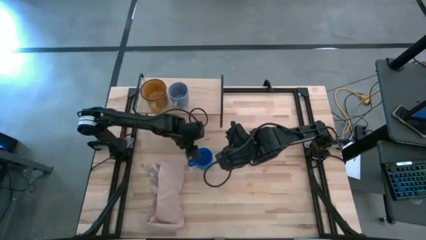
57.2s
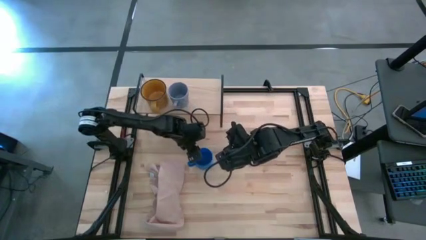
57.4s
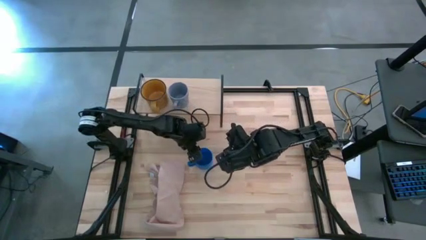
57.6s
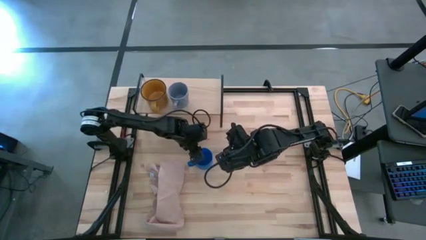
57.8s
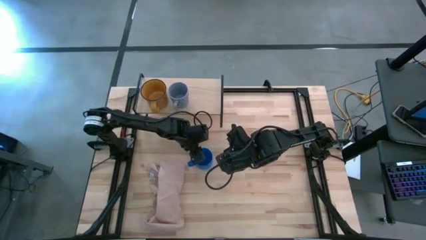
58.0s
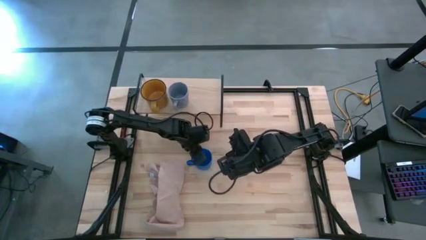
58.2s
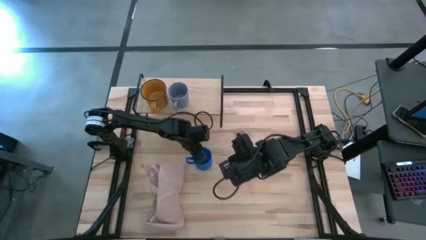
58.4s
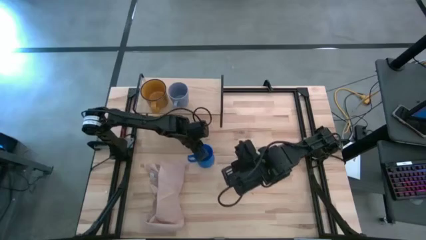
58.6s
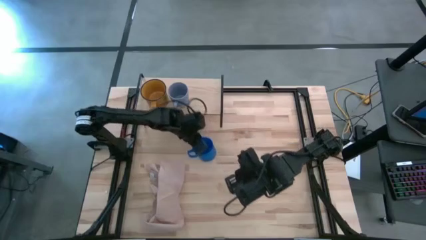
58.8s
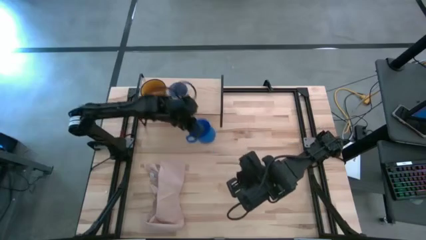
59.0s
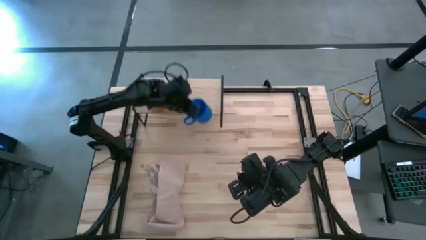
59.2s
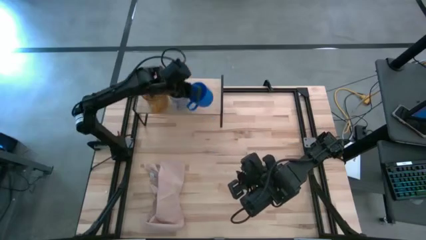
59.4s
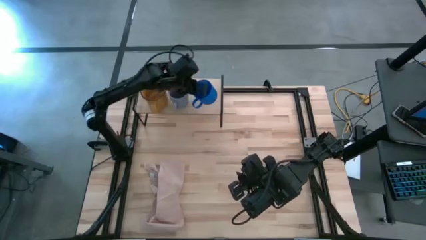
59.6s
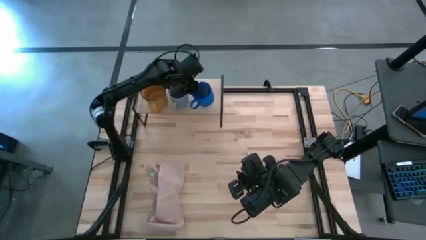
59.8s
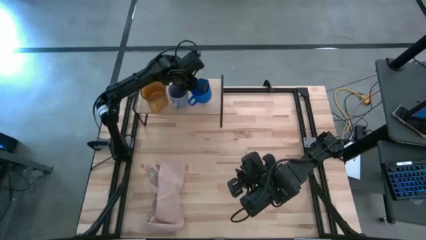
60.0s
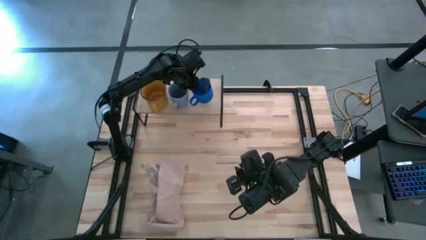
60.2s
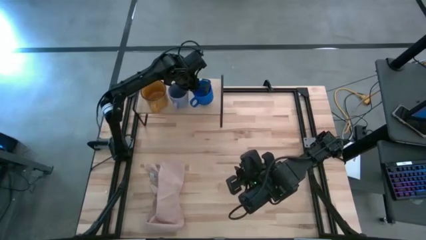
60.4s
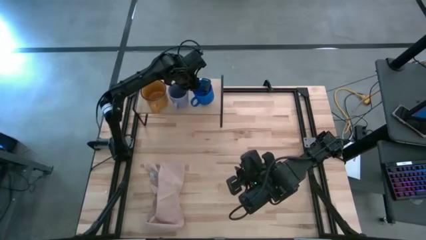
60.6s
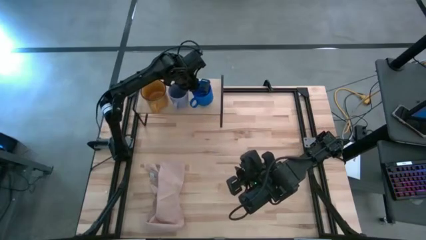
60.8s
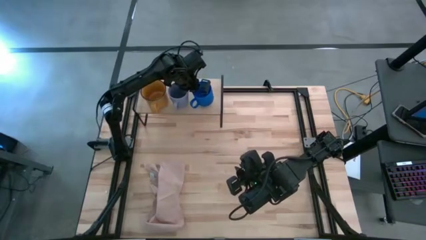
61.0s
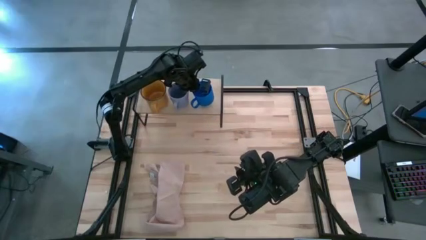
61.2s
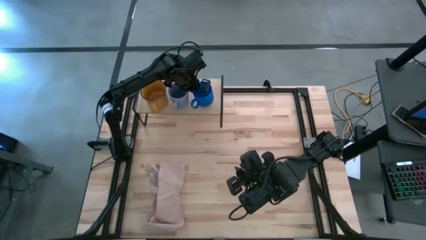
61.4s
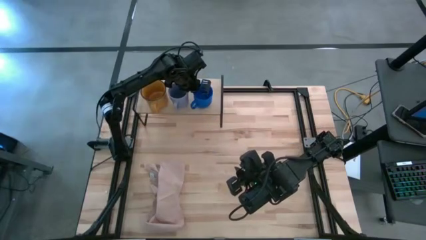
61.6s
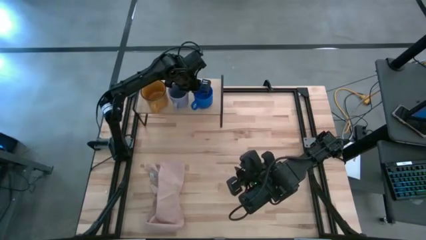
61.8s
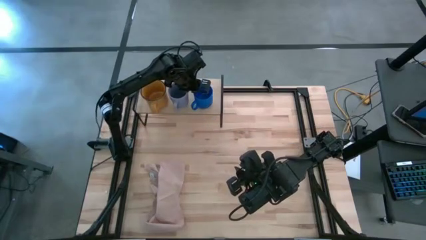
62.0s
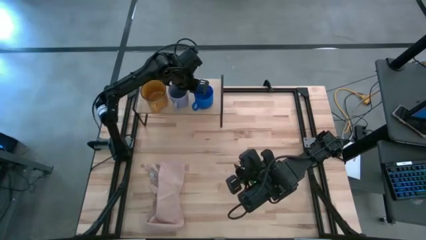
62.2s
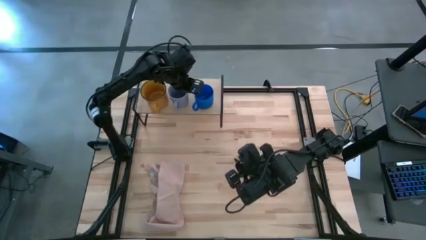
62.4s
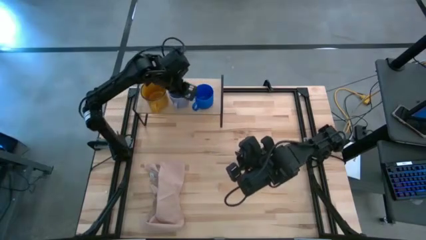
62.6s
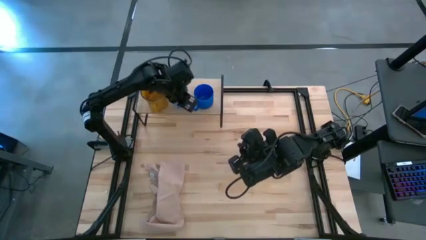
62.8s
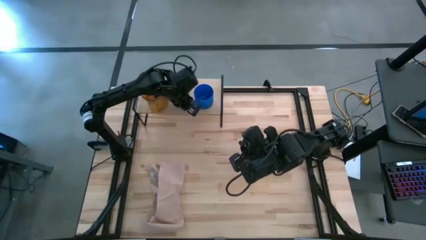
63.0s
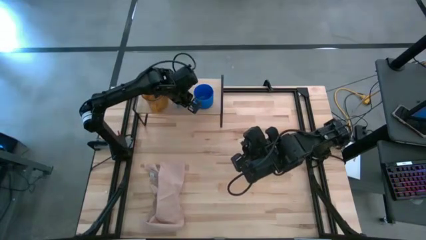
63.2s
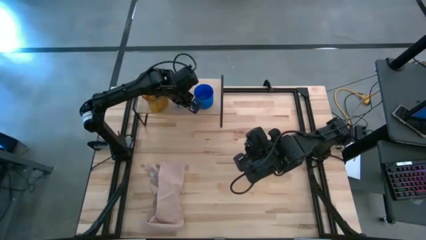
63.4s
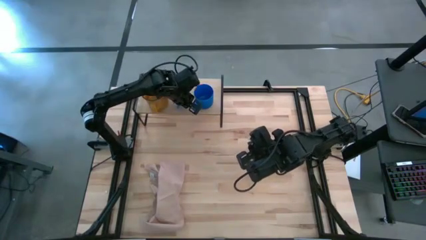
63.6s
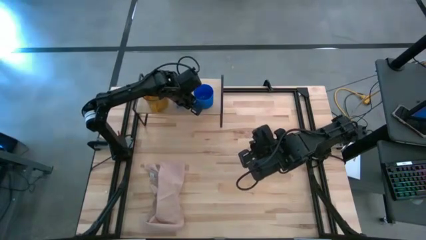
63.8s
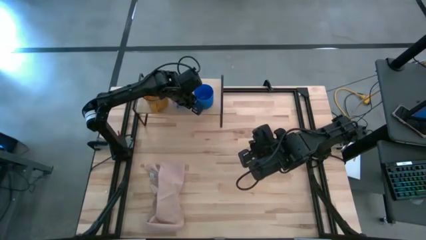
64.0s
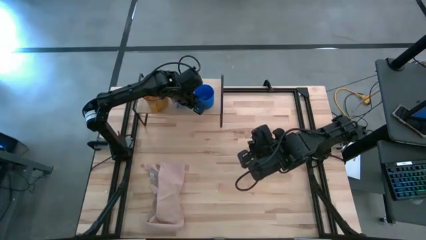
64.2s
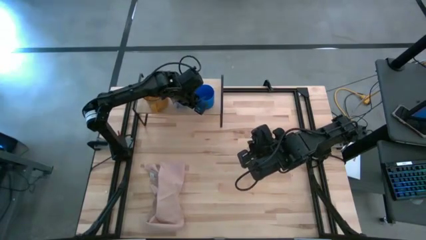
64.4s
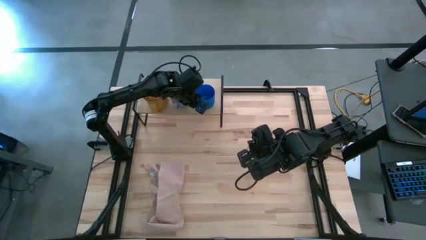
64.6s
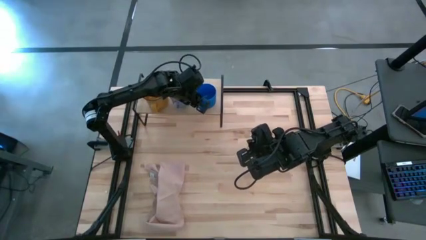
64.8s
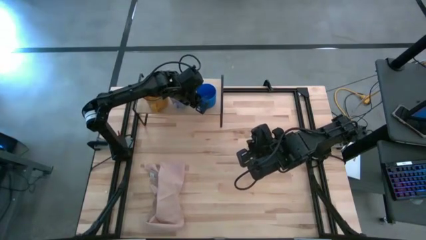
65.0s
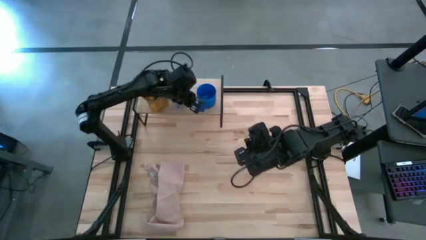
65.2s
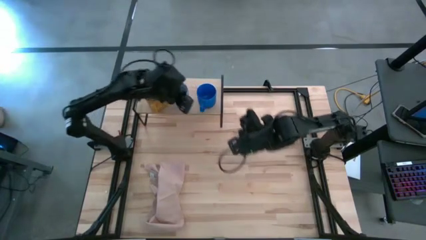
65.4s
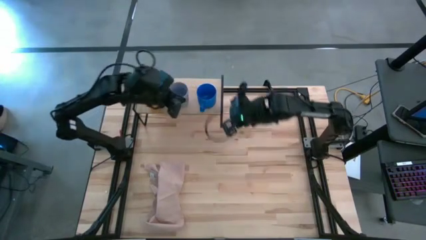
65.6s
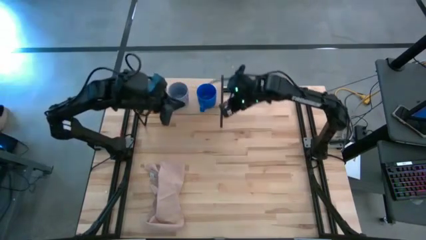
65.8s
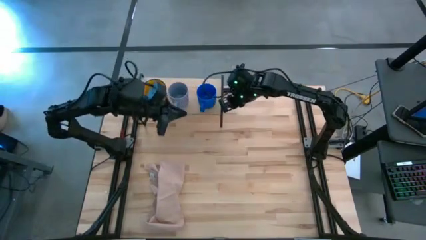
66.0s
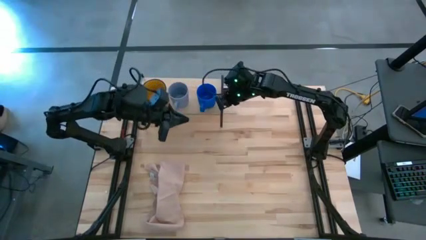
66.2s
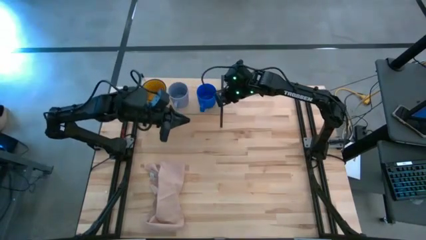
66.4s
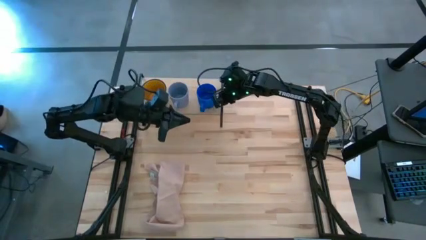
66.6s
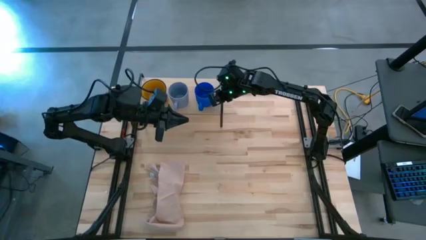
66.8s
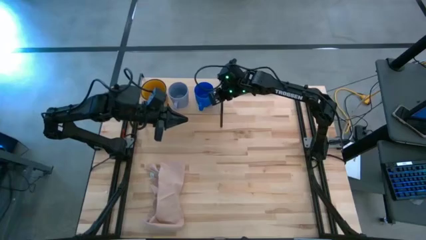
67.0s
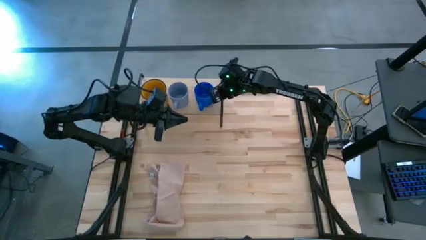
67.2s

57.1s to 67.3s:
Task: Stack small to large cups/mugs on shelf
Put the blue mug on the shelf

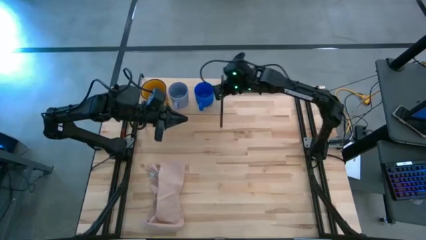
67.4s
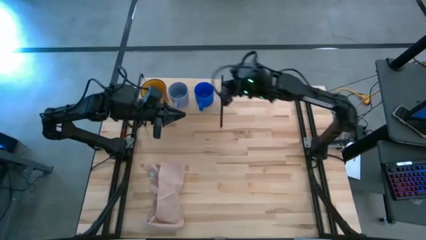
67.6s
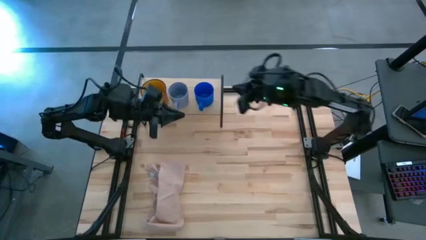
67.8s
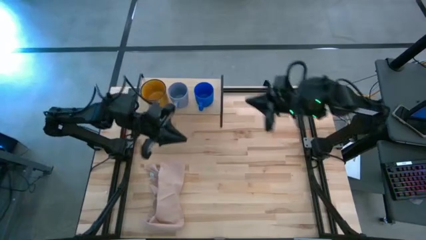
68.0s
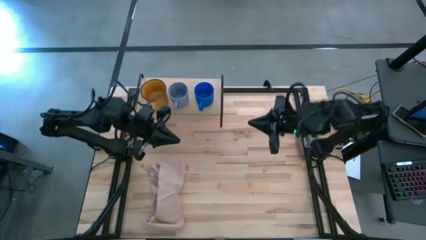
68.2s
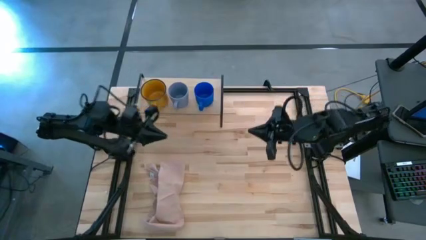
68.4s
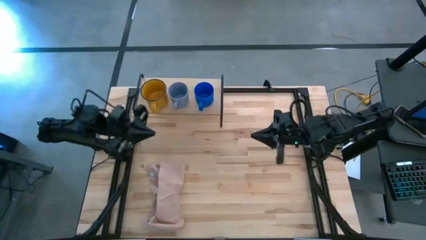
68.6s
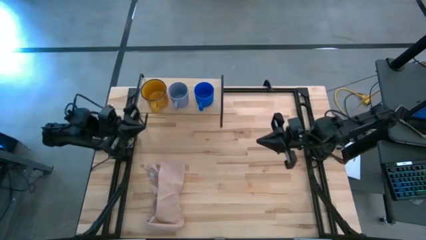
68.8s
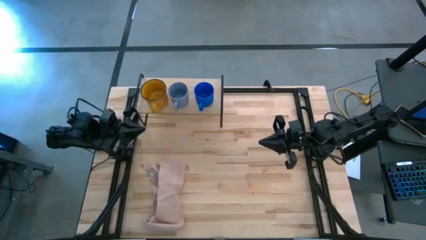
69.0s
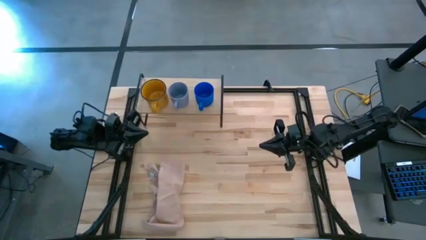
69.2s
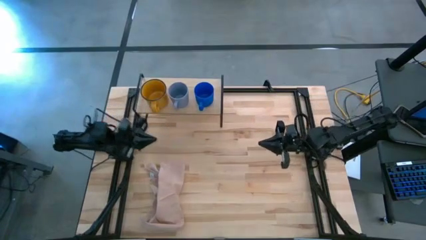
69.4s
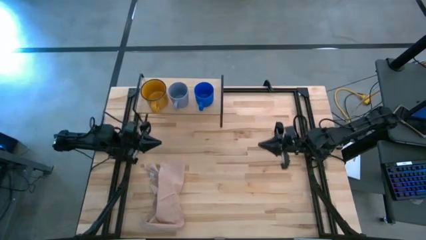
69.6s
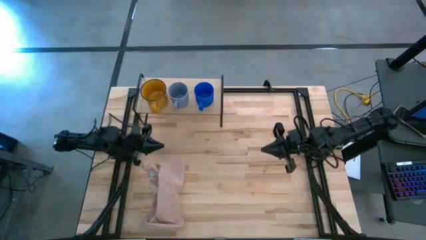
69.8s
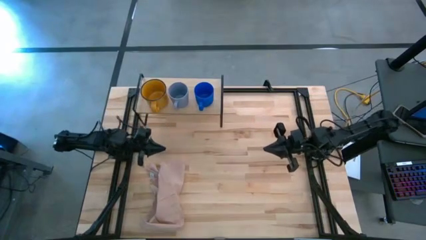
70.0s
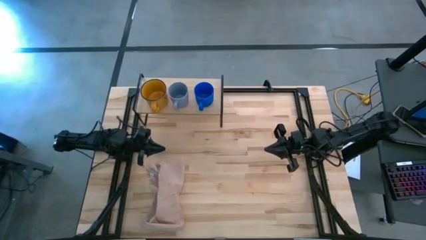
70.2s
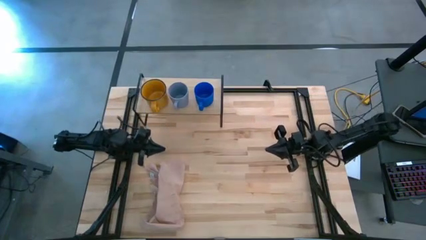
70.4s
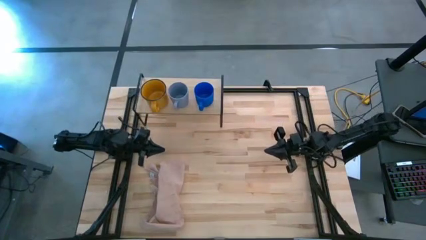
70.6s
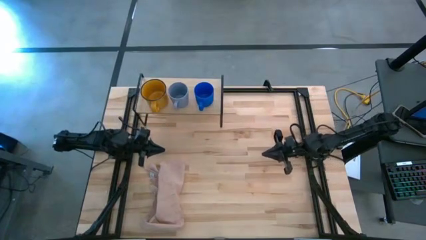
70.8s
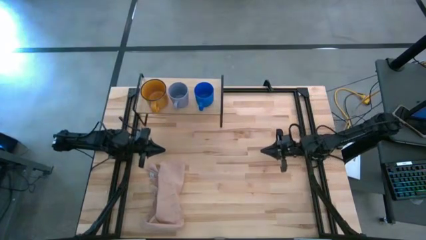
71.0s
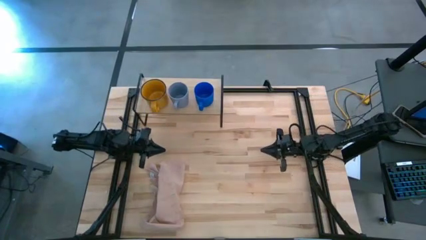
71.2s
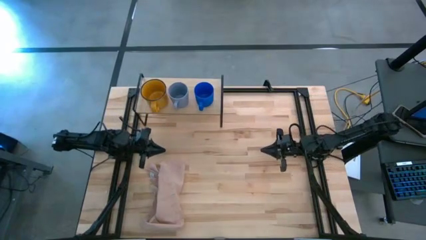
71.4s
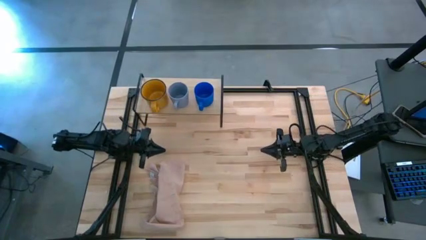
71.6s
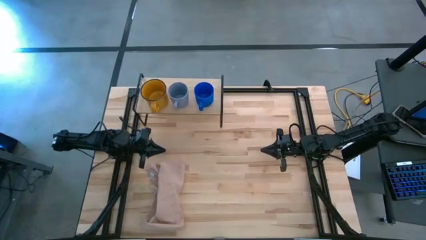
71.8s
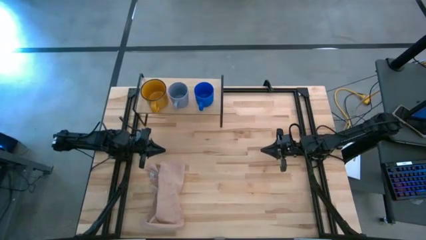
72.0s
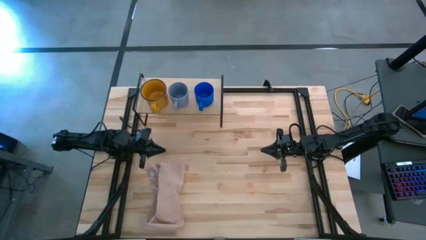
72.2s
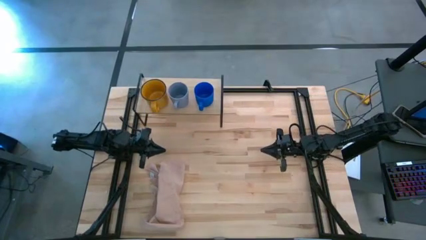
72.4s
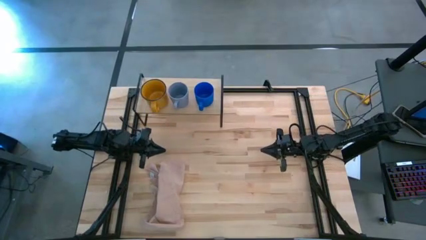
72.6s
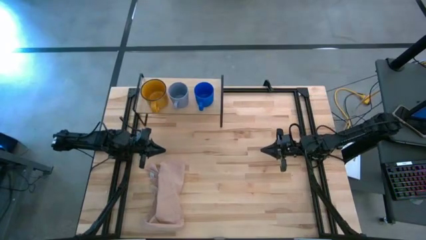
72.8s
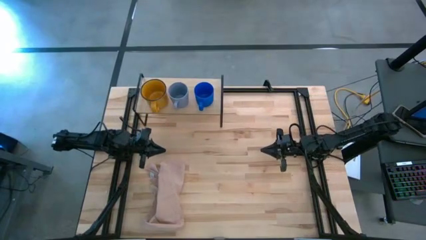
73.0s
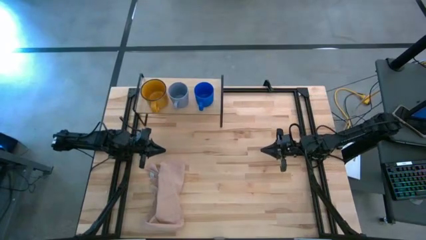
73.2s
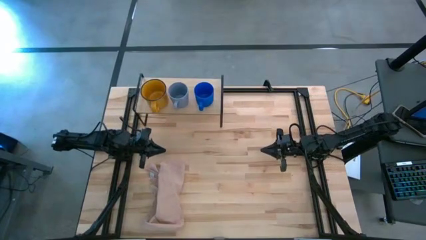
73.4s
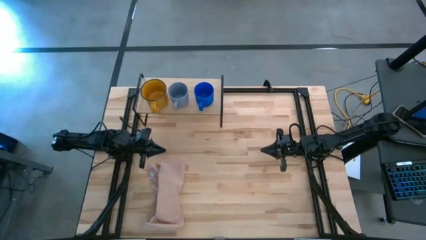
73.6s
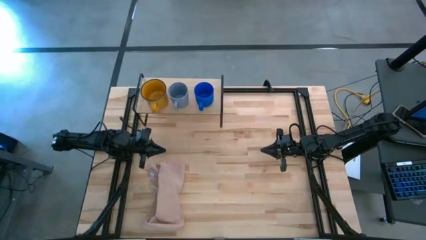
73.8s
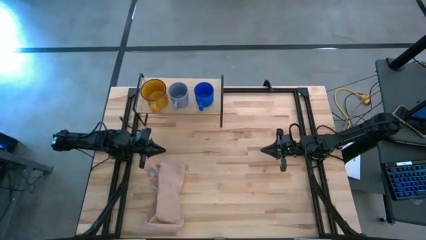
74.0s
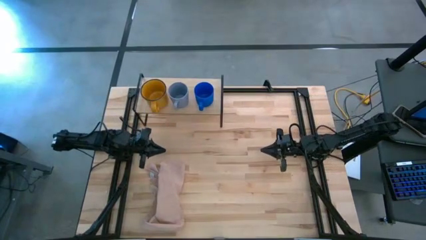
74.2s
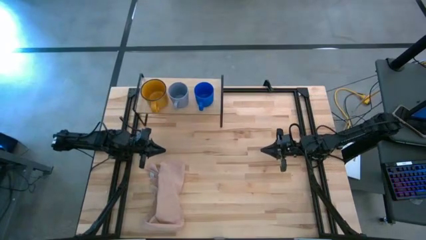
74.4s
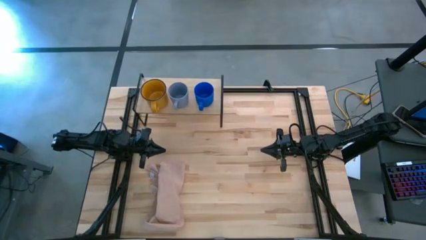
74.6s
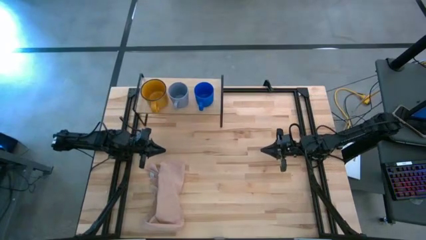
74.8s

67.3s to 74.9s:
Return to Home Position
